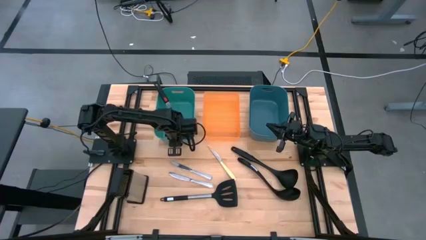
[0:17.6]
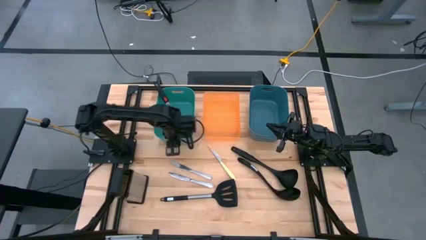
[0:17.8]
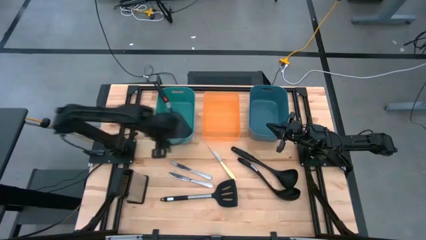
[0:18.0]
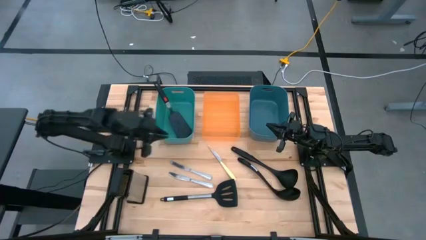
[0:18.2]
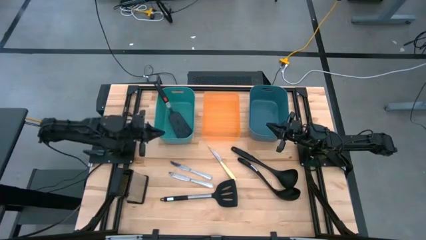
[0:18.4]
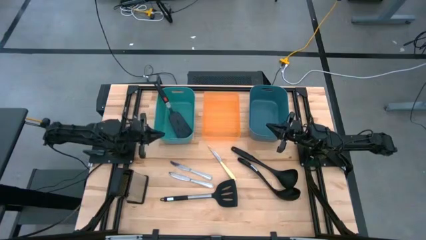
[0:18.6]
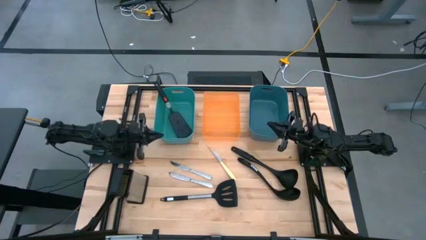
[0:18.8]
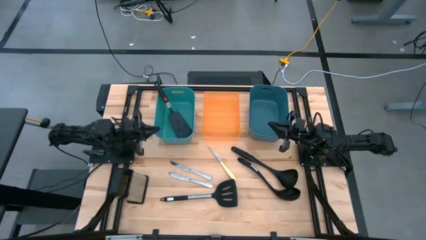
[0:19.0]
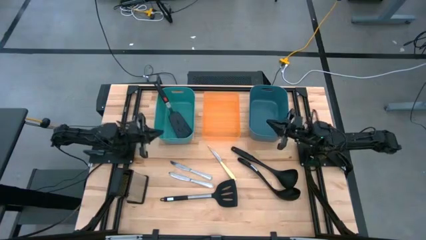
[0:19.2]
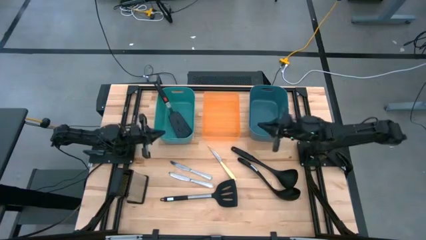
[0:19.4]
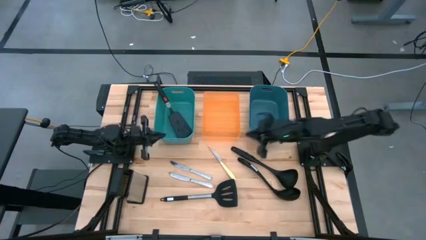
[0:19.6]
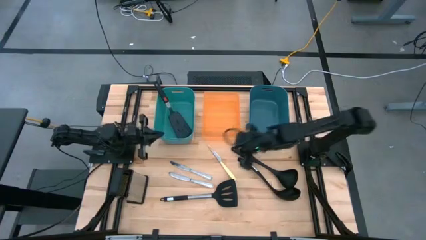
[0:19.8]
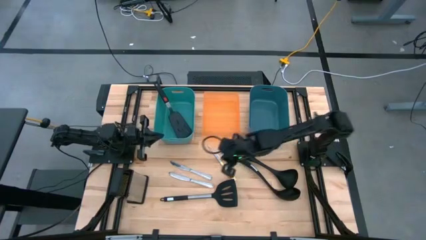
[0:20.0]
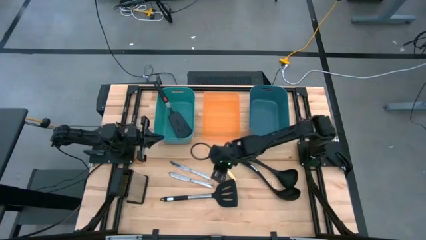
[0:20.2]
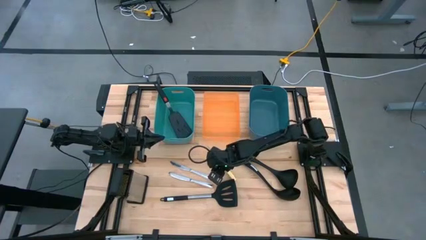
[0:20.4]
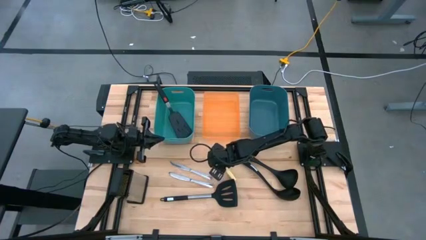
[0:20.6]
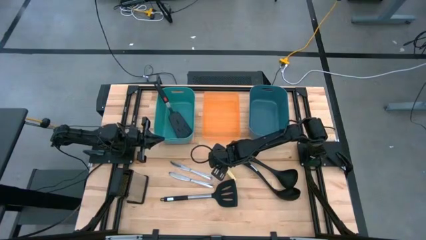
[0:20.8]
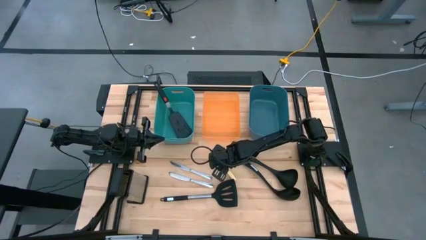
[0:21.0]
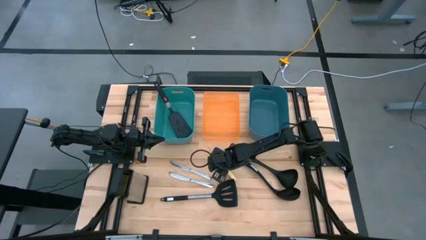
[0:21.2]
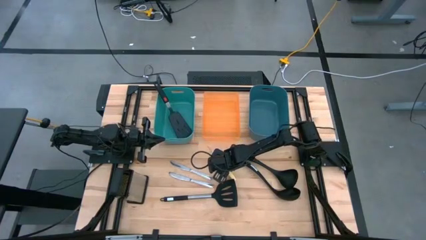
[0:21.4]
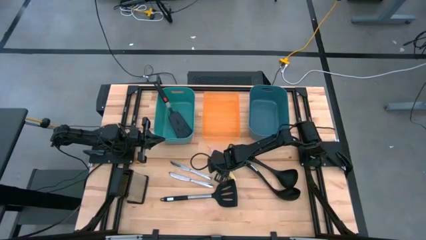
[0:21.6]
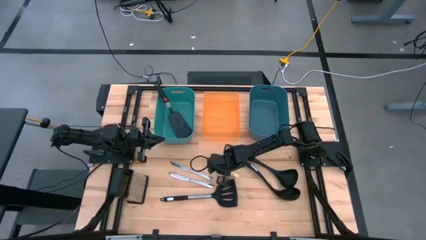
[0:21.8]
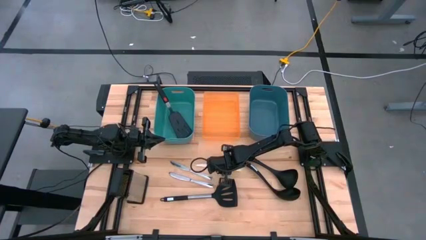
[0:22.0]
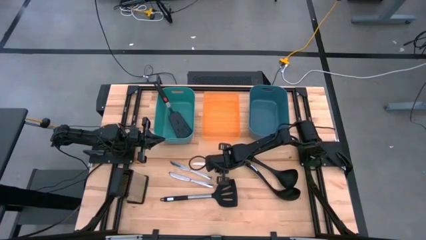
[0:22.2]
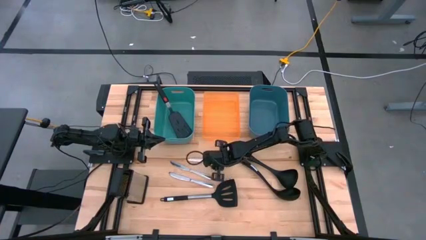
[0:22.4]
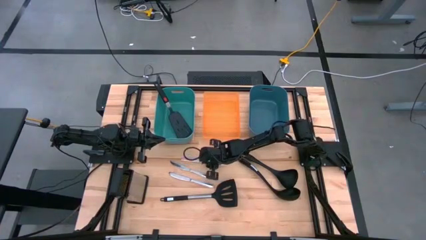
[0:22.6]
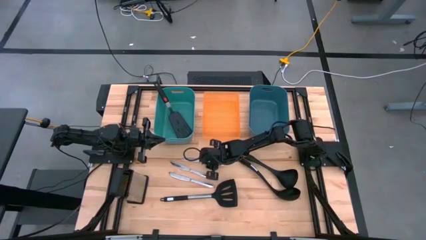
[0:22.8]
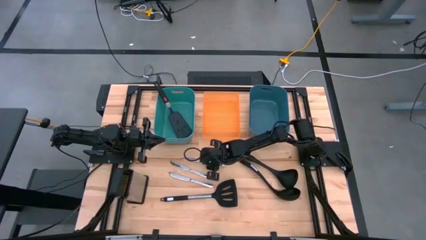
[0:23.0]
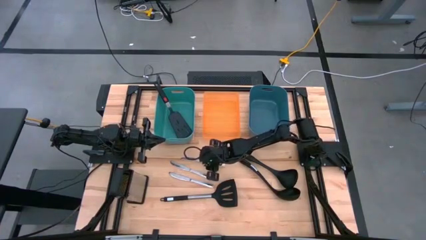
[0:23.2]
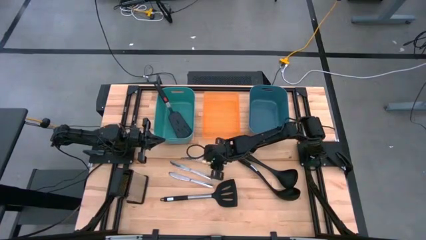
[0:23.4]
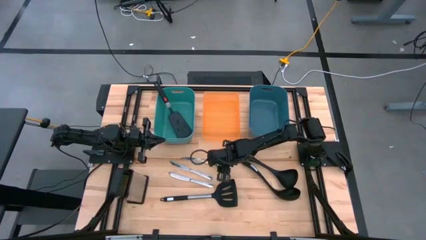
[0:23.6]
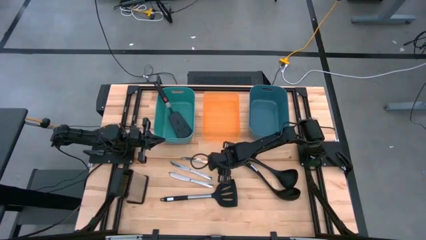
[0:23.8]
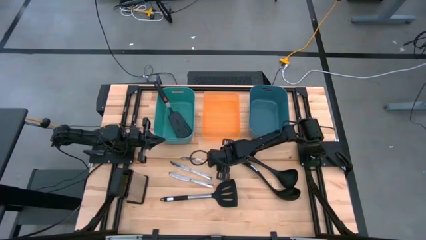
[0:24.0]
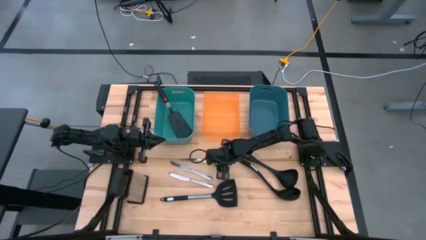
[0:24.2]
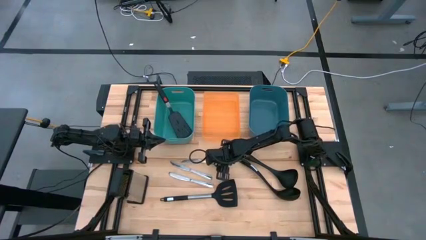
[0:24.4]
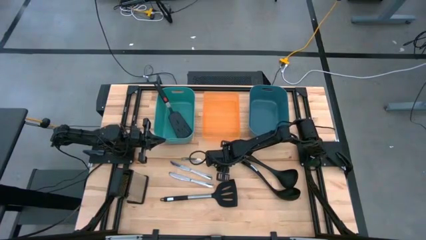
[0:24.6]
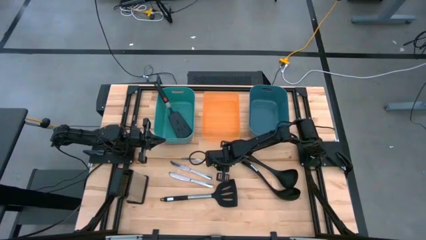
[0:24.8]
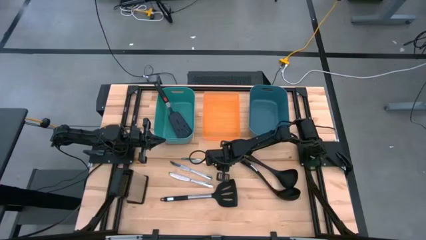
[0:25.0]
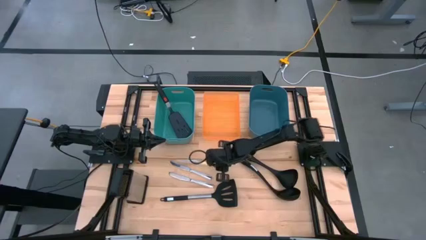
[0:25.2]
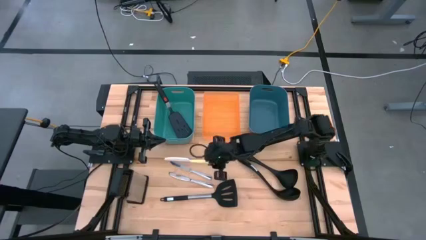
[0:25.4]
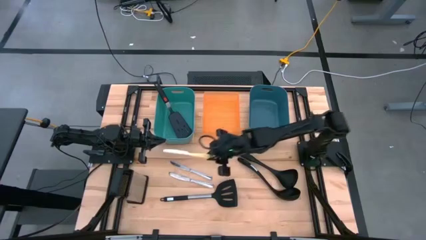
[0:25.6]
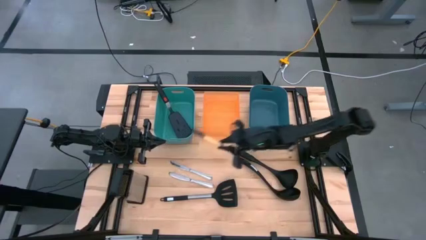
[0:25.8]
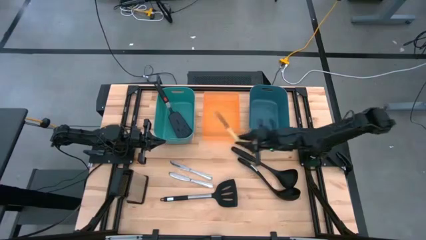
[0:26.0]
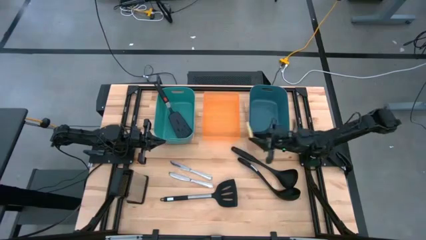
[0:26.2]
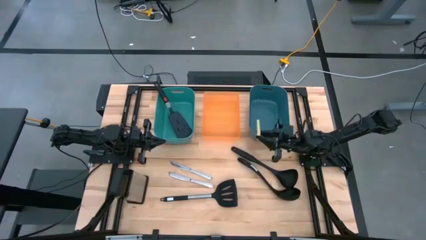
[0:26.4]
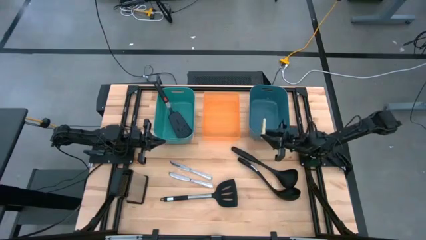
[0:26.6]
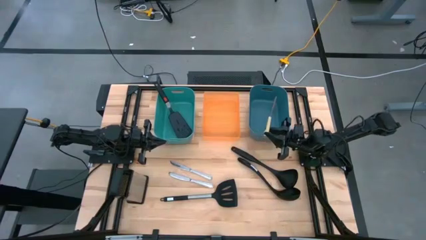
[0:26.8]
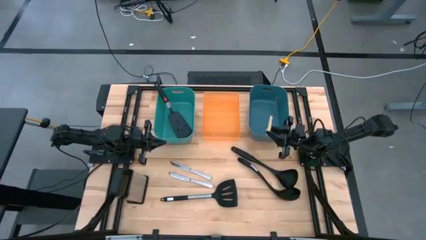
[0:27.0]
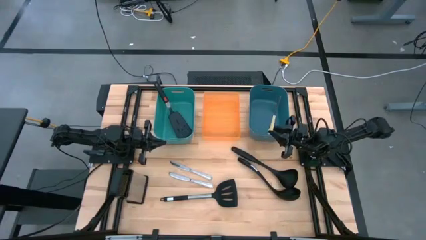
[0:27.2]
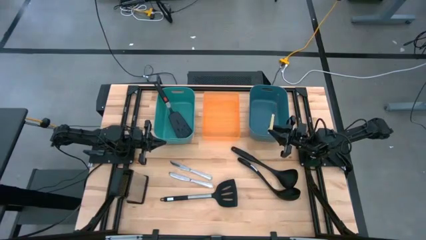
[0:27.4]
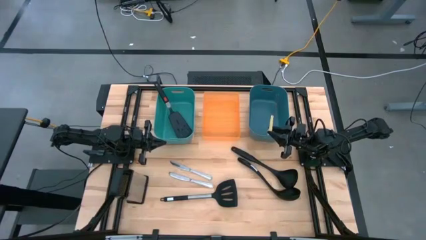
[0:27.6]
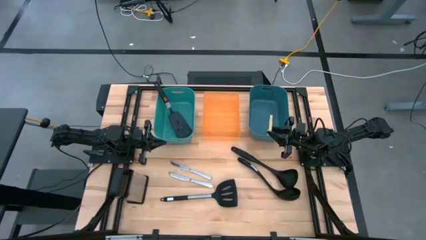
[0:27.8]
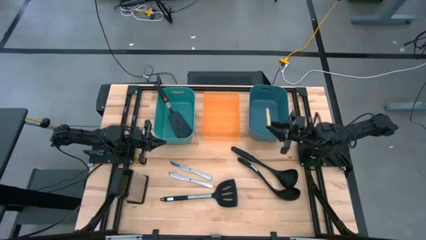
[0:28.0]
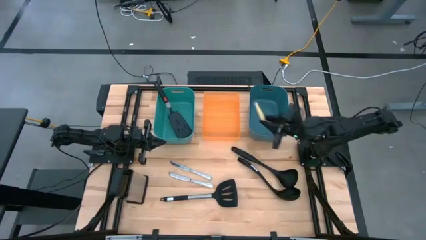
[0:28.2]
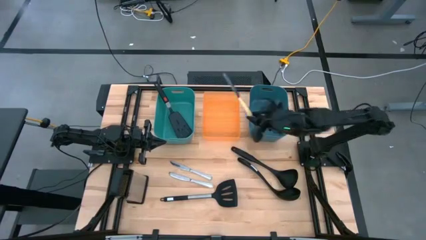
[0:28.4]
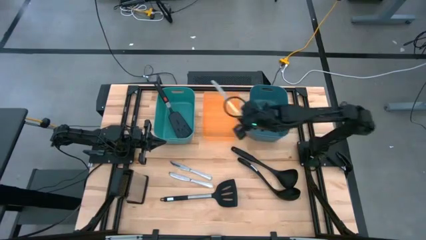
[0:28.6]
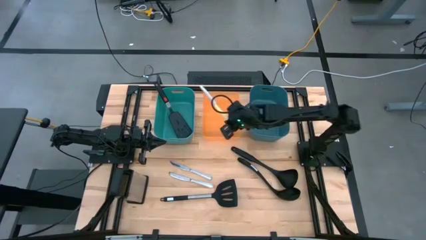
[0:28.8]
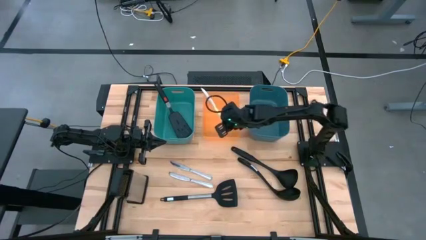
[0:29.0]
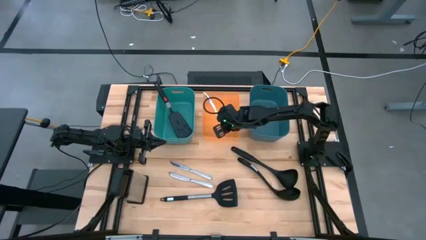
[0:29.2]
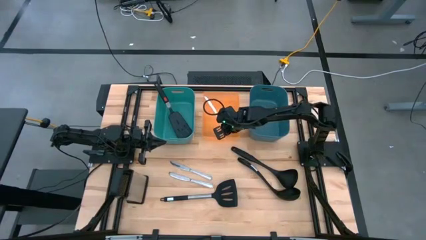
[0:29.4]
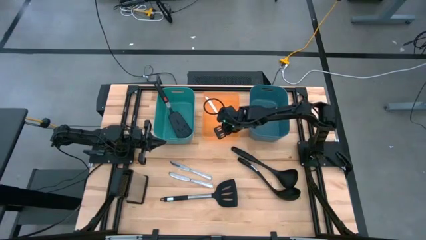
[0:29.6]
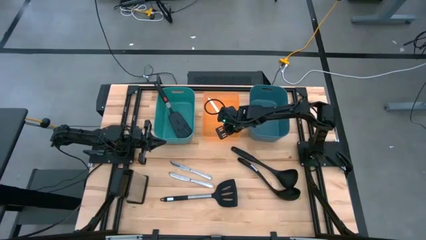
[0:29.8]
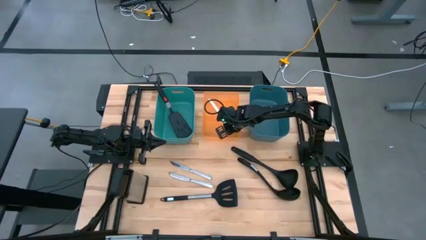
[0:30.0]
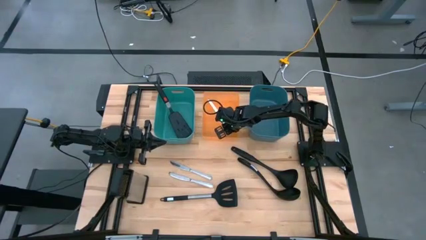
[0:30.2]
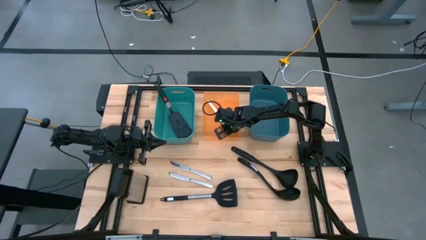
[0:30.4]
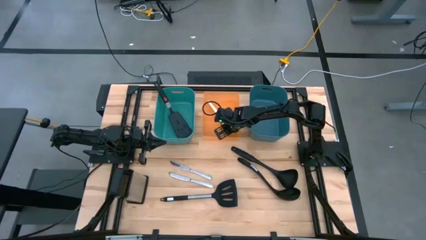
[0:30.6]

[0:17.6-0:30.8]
Task: Pick & Place Kitchen Items
Put the yellow knife into the orange bin

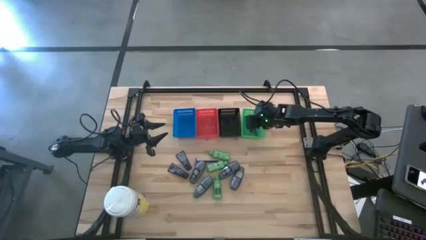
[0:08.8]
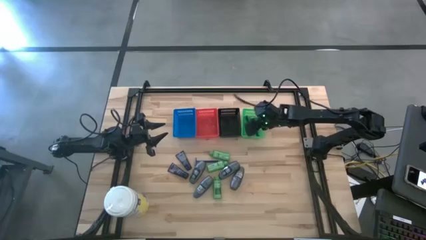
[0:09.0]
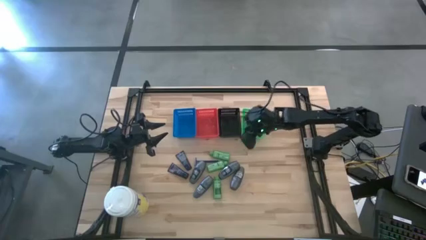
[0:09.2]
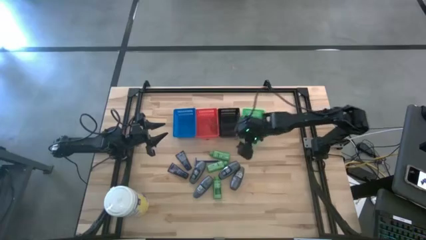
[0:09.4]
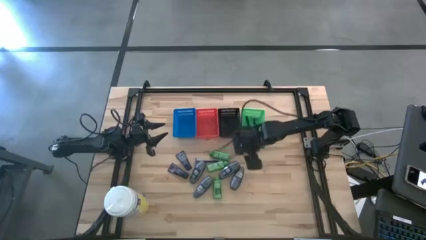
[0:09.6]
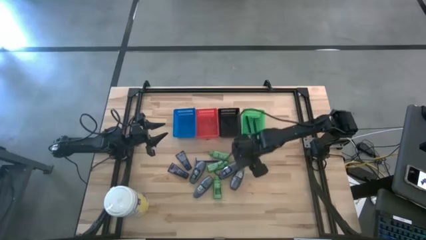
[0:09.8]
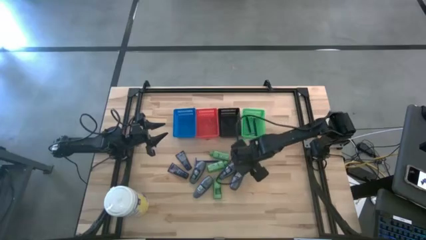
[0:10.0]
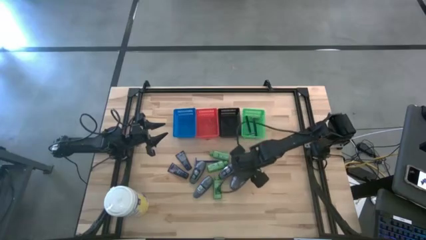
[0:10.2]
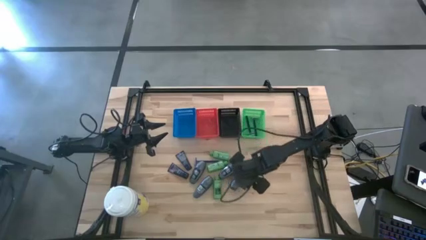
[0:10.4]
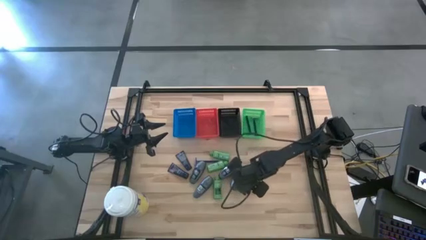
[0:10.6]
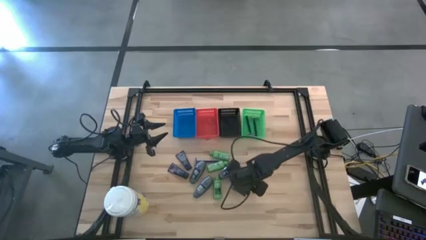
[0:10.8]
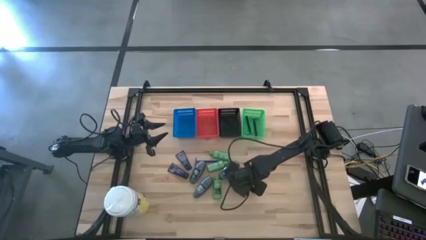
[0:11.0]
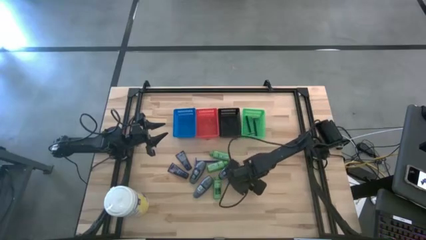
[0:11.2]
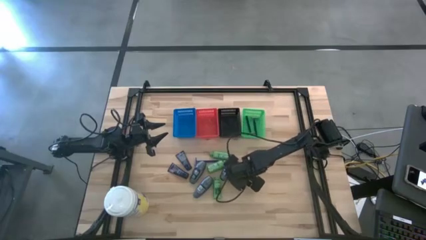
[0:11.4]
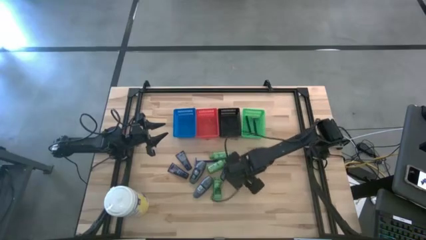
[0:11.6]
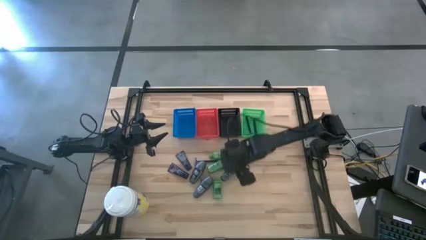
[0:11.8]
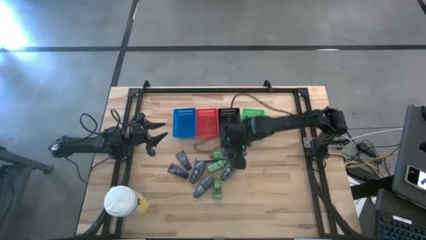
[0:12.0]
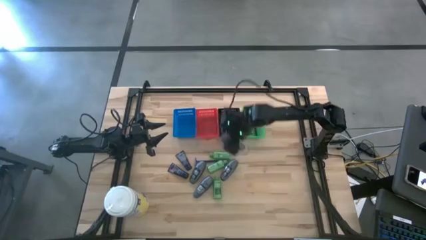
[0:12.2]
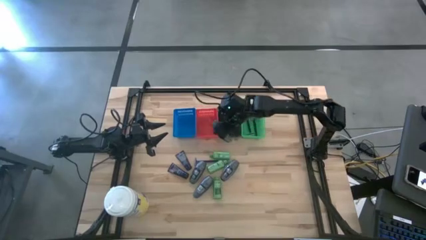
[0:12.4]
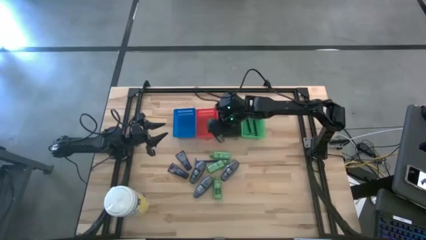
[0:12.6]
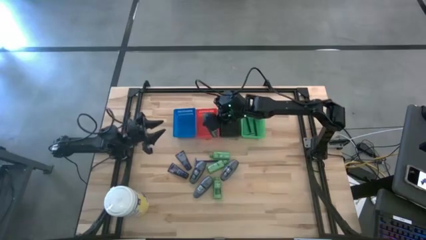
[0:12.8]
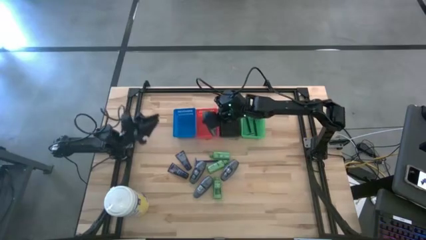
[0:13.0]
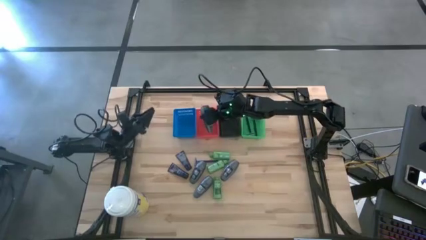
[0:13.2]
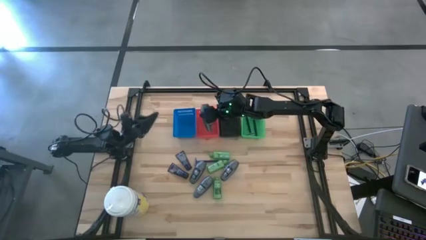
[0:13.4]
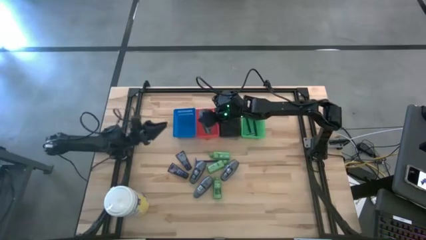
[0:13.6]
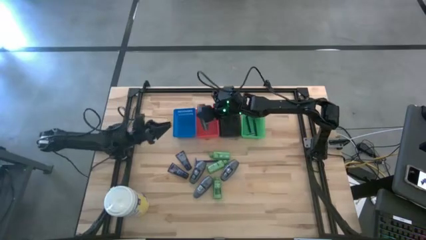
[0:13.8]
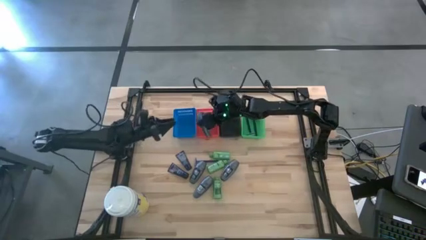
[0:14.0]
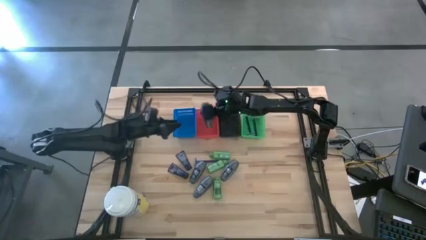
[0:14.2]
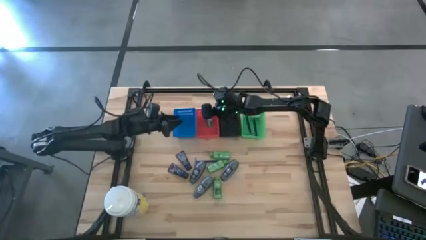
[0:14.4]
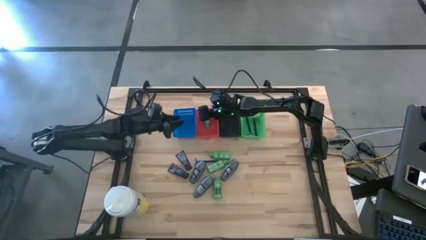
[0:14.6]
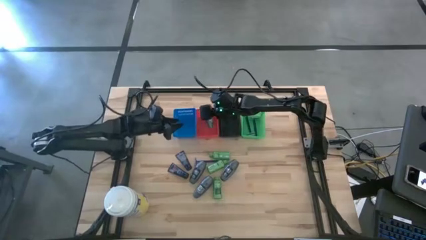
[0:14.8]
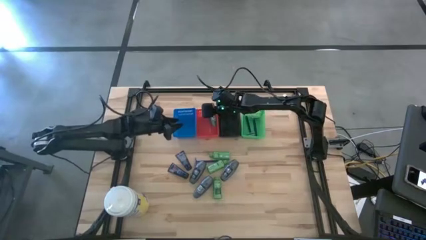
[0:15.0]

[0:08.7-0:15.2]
Task: Pick & Place Travel size toiletries
Put the gray deodorant into the red bin
